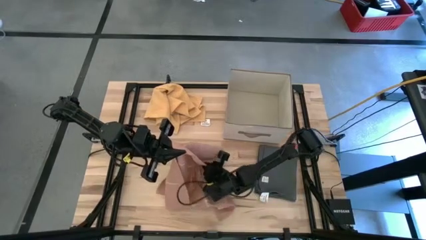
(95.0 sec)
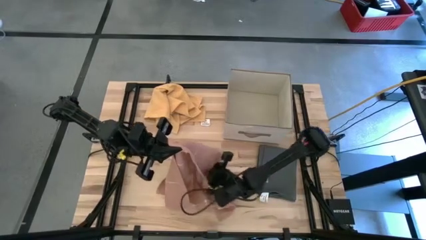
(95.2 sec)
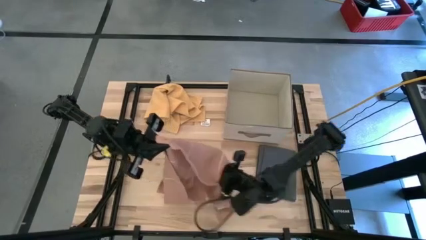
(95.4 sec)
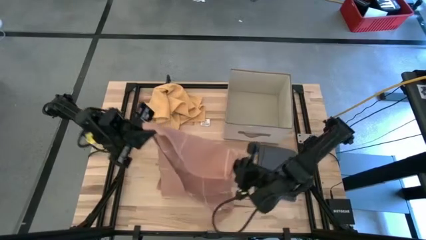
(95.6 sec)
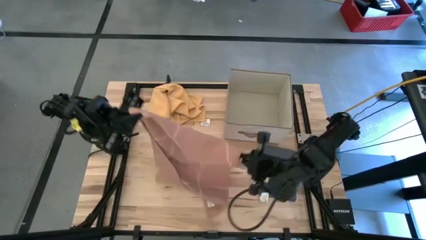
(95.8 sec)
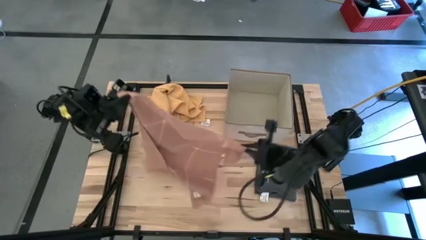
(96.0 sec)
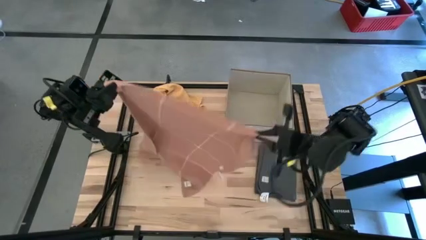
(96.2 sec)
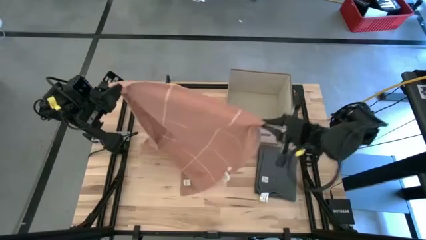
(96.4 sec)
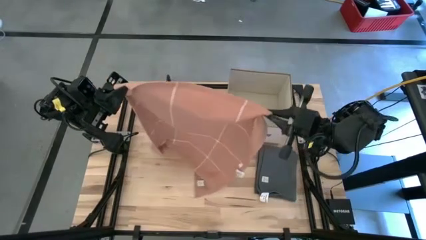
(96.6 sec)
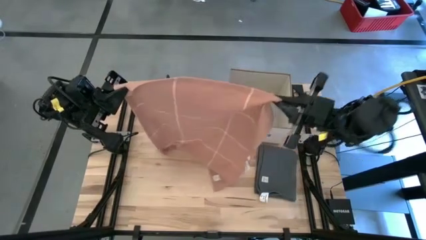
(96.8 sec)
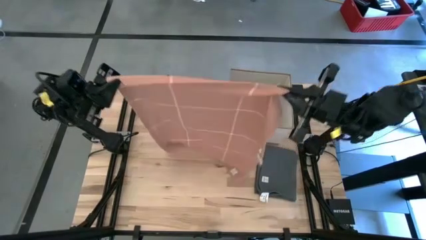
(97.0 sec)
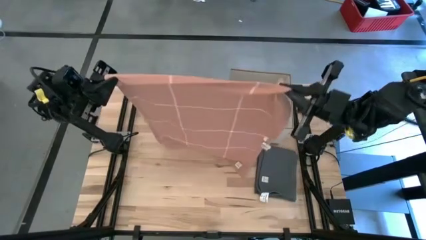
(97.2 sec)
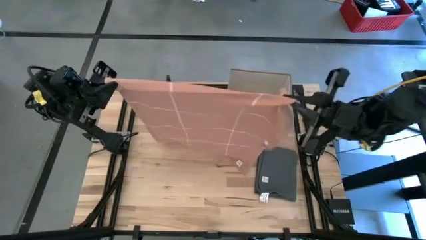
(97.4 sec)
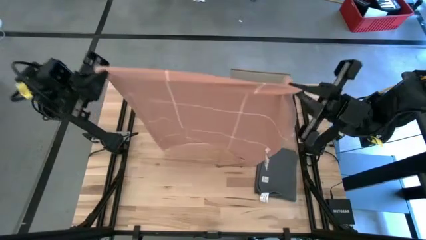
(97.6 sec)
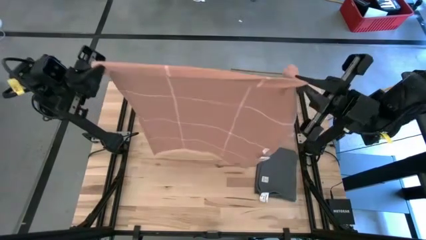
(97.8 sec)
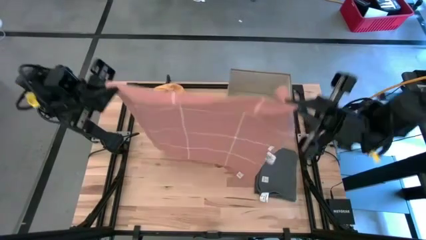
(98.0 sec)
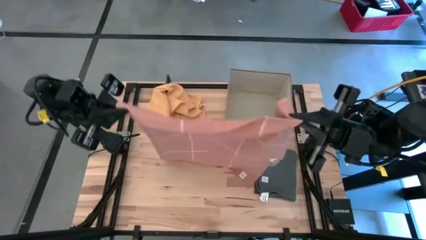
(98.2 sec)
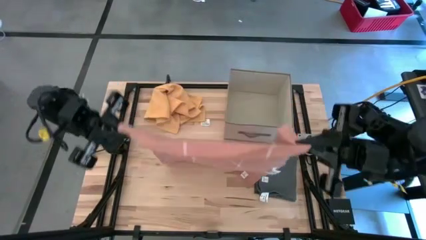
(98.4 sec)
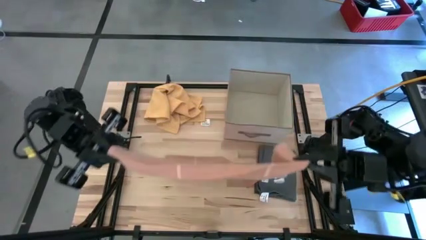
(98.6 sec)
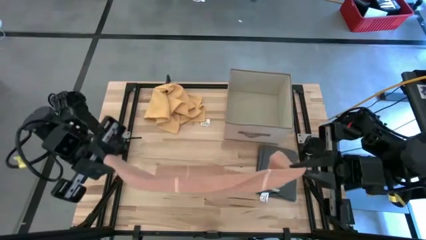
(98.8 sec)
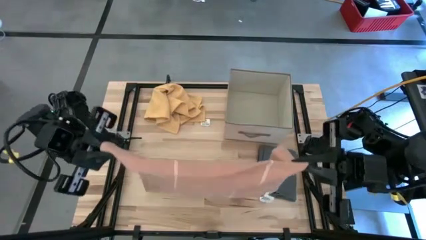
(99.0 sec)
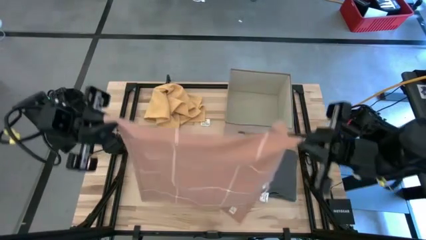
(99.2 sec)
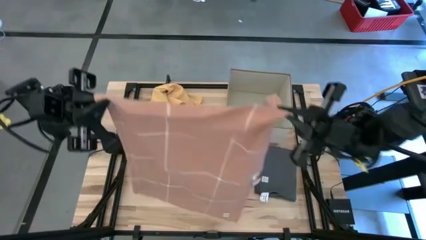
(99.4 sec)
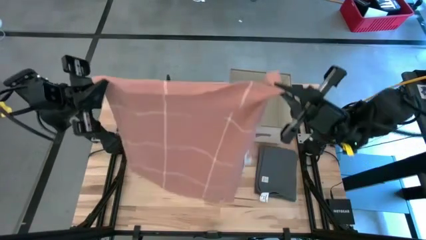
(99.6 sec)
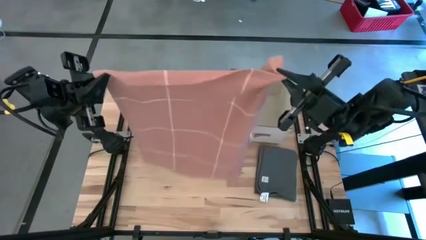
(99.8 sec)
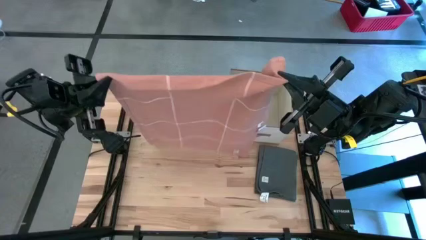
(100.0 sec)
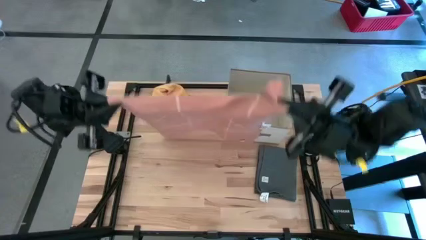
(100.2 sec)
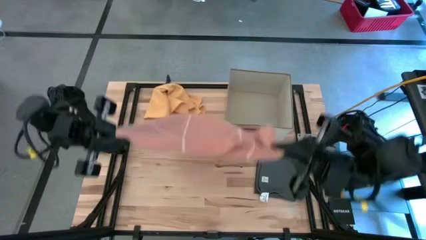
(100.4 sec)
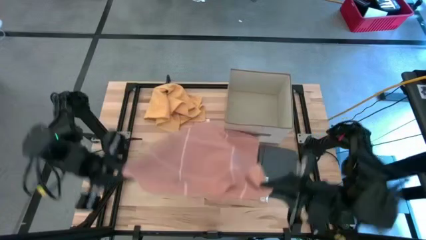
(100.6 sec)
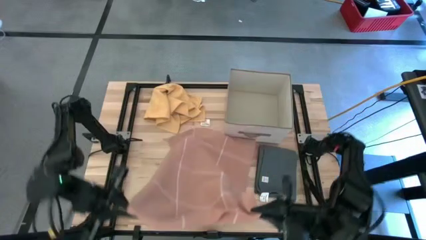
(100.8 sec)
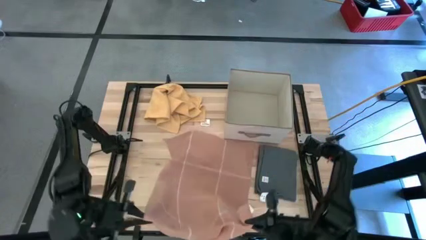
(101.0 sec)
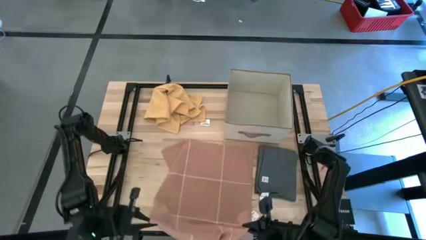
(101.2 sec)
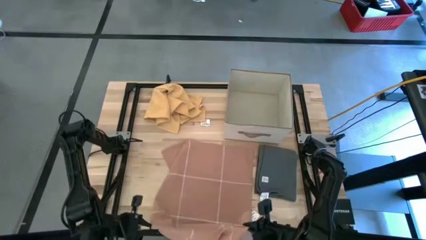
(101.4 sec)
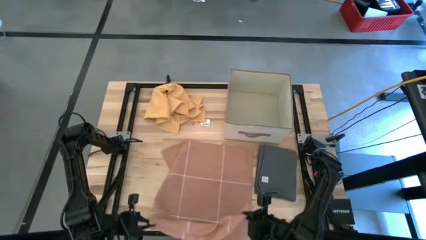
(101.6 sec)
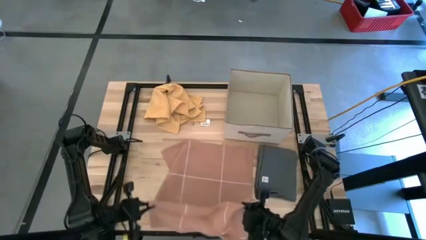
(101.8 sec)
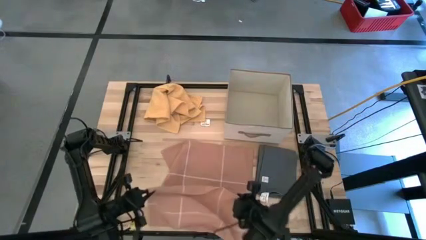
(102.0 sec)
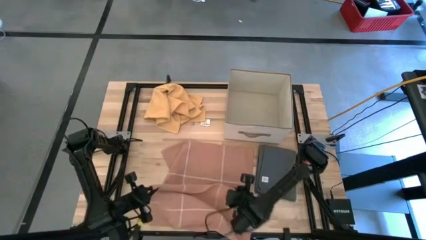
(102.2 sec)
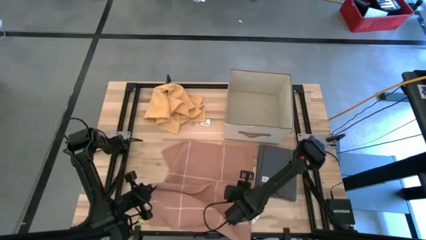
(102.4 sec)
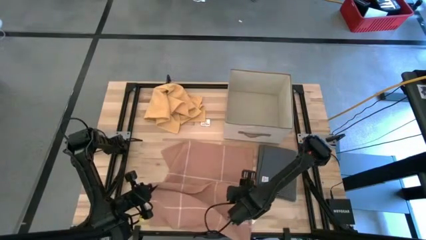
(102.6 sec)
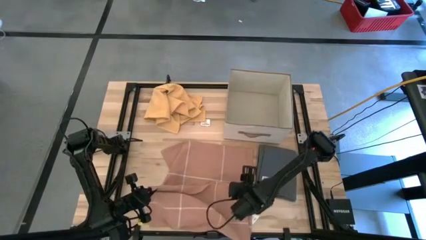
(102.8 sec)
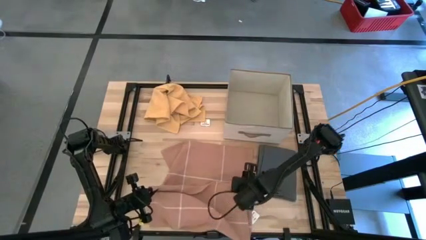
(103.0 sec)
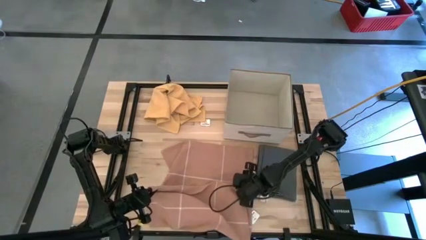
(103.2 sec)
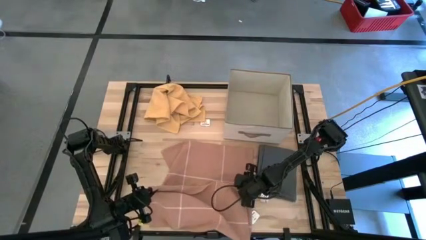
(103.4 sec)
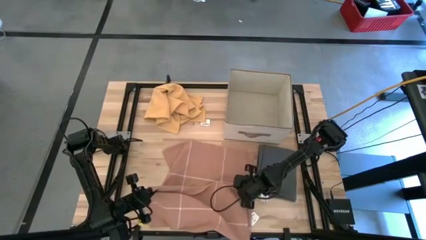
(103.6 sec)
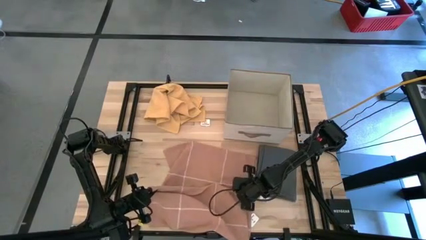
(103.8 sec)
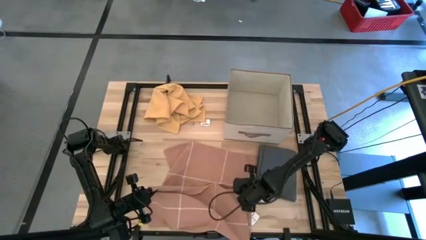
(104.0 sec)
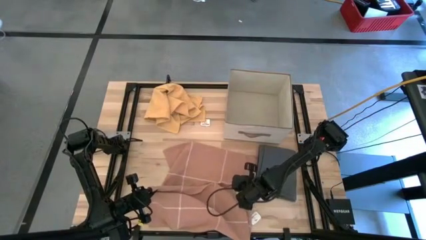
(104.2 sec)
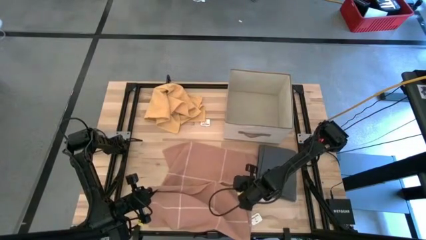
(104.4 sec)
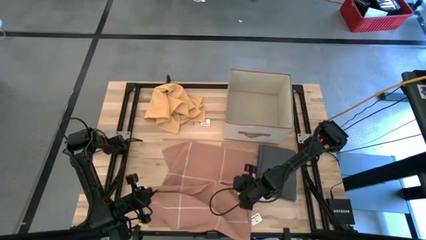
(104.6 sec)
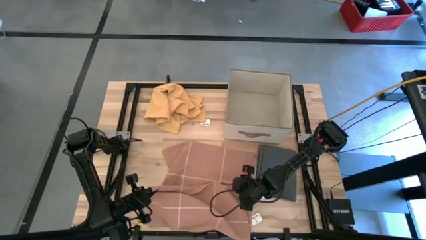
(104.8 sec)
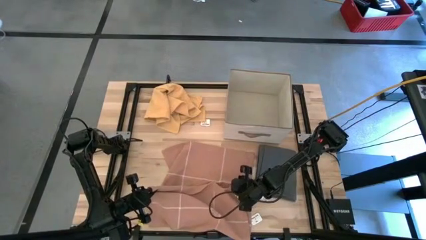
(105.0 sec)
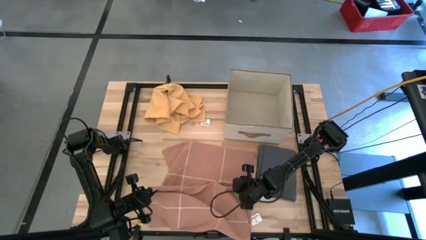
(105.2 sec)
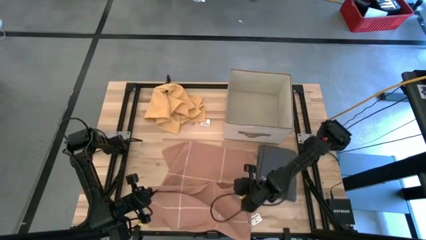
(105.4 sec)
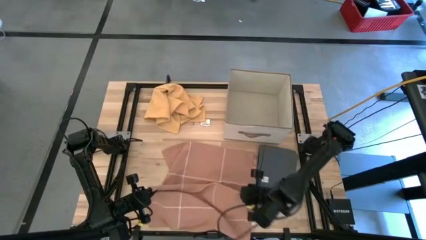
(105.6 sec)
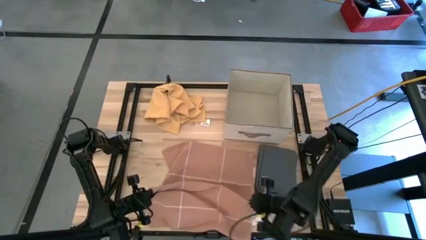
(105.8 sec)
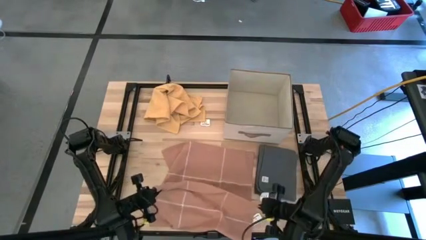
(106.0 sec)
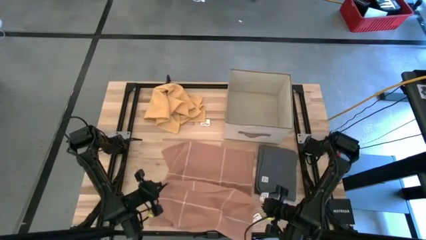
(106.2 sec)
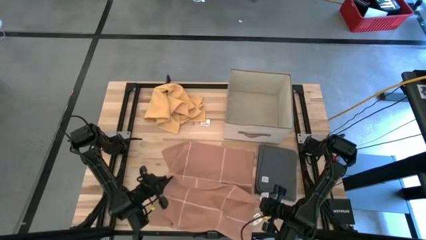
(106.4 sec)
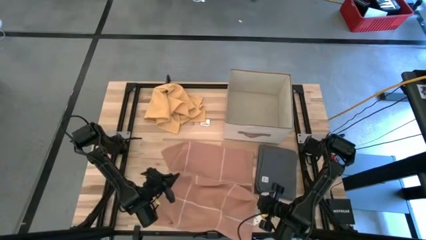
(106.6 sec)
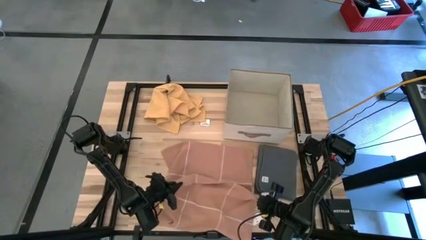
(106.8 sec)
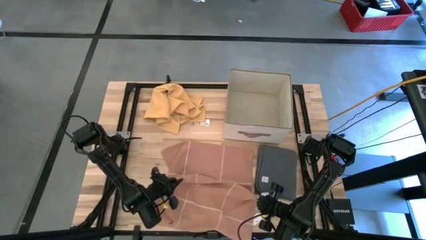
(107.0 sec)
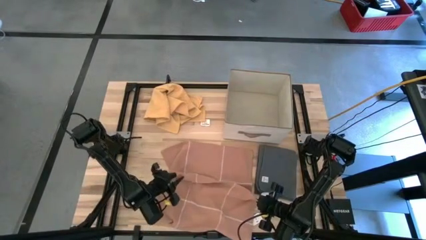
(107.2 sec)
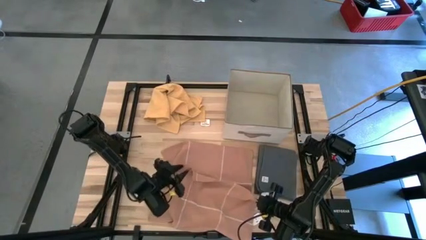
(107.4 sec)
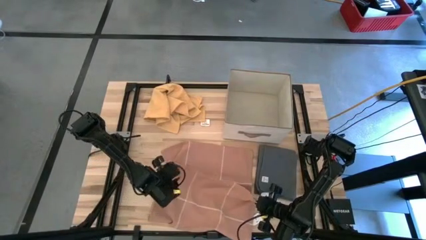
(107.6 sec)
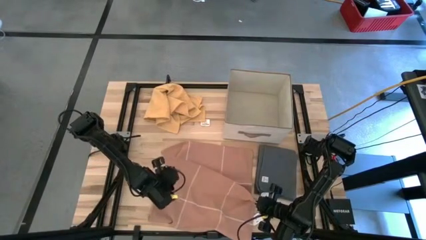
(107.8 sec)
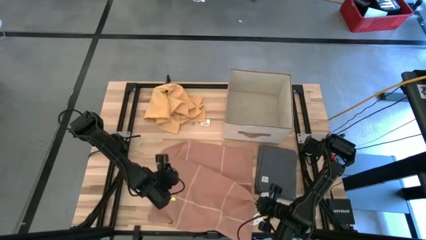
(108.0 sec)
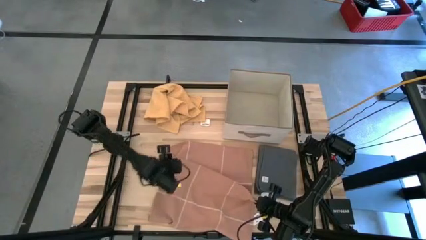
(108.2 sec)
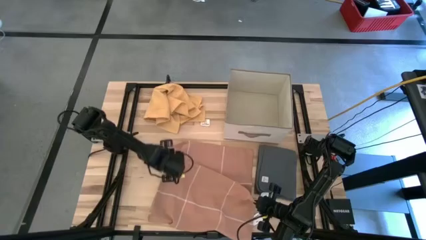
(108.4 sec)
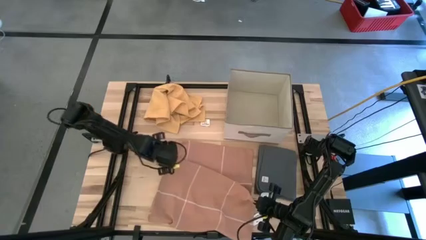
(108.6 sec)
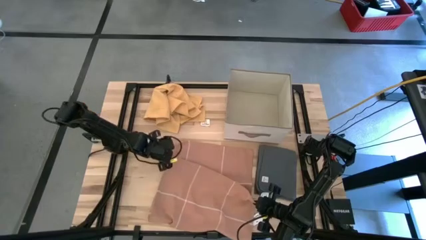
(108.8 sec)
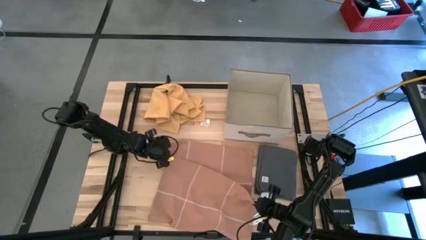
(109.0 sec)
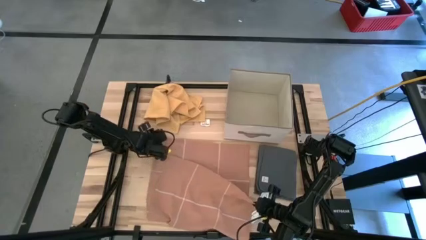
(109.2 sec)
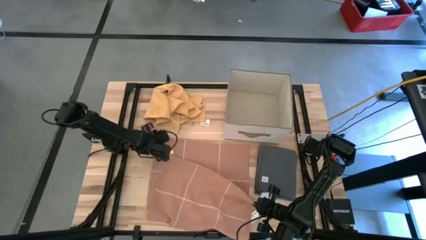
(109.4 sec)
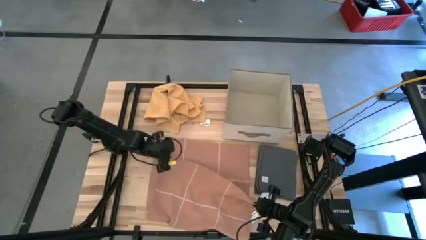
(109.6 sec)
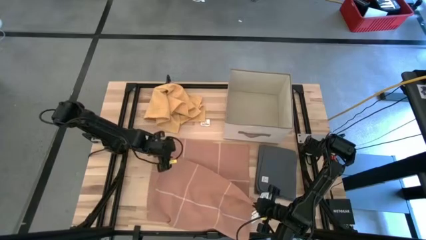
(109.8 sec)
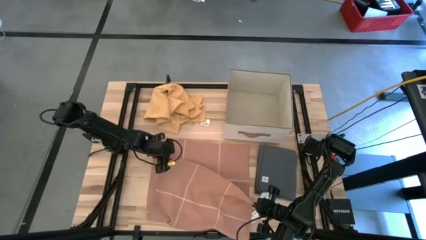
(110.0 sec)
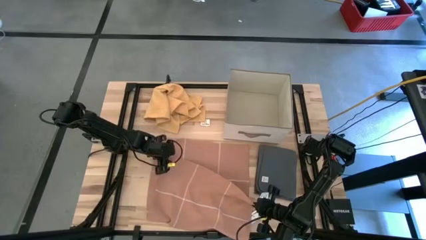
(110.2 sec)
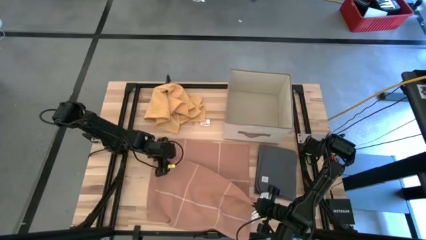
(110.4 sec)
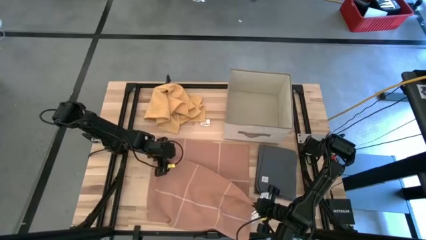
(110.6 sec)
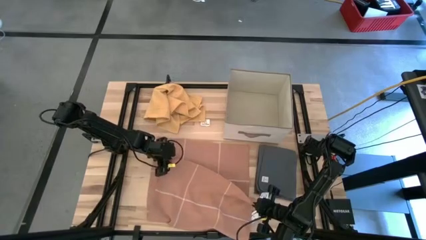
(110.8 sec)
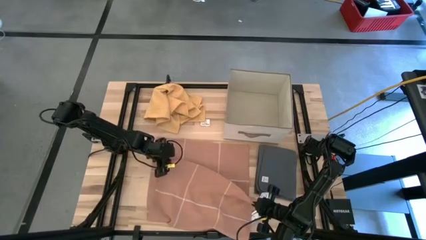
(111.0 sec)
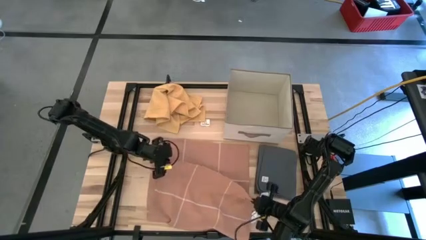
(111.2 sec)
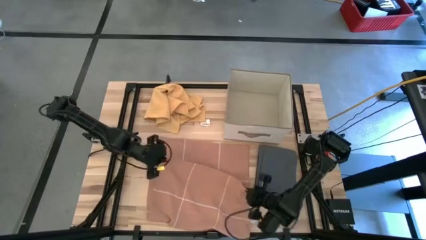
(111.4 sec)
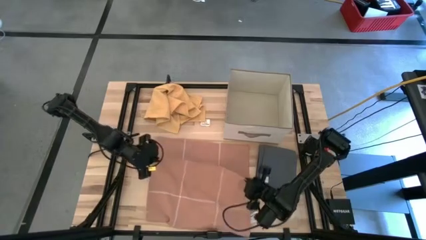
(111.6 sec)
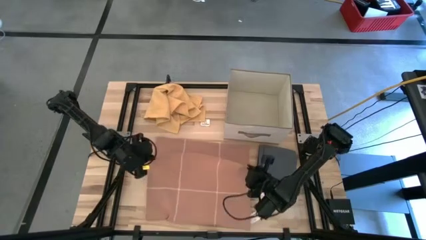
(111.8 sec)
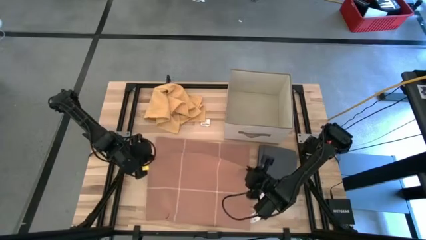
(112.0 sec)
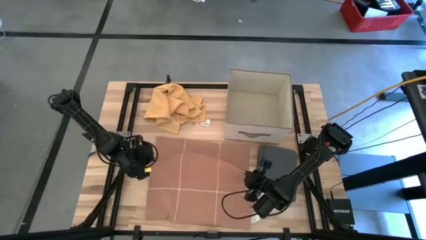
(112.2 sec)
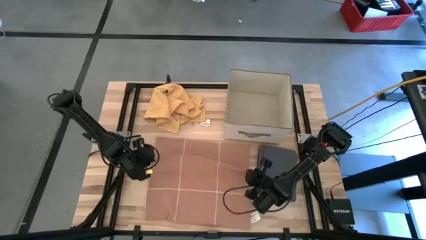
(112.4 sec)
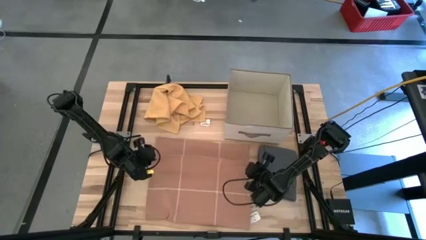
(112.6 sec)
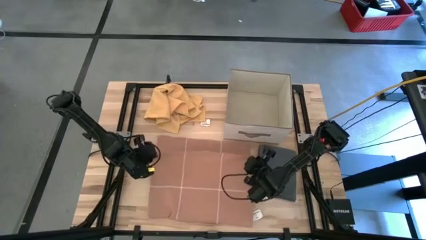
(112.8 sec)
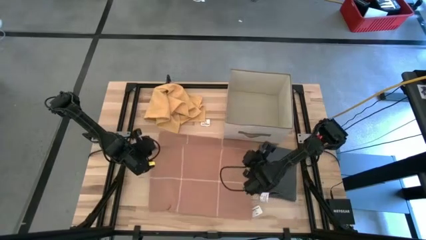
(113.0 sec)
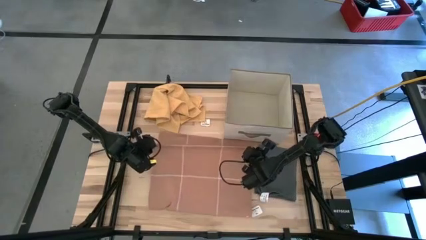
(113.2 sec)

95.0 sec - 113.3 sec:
Task: Fold towel
Fold the light orange towel
